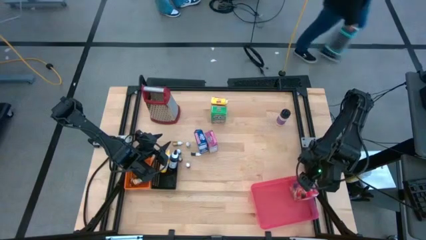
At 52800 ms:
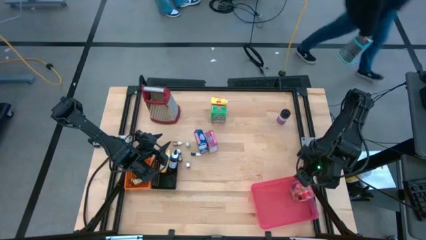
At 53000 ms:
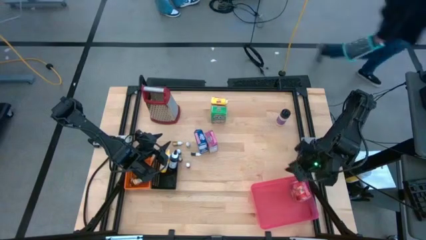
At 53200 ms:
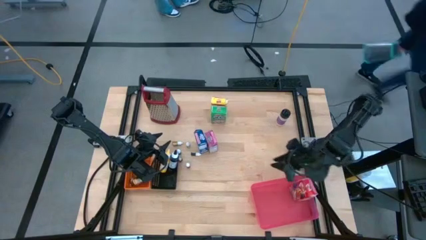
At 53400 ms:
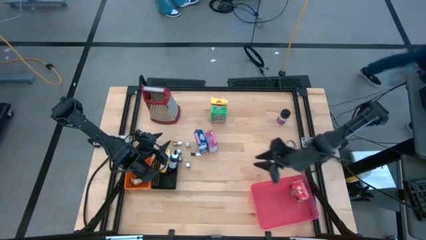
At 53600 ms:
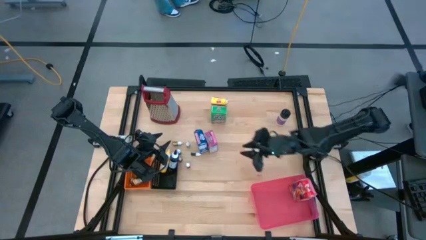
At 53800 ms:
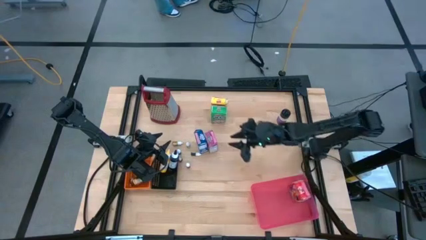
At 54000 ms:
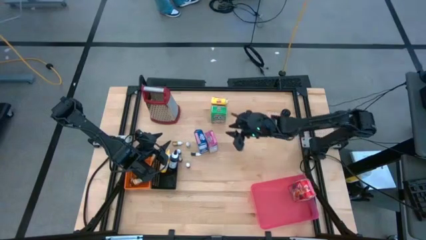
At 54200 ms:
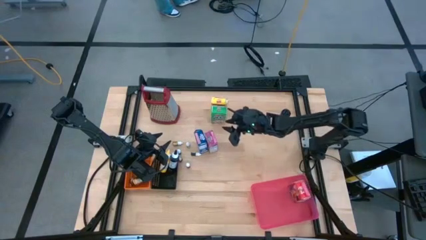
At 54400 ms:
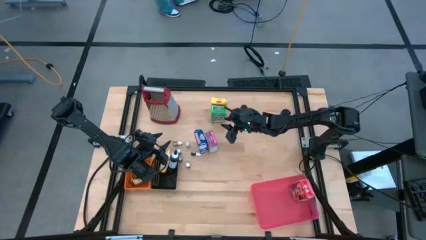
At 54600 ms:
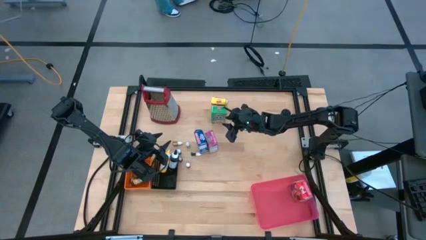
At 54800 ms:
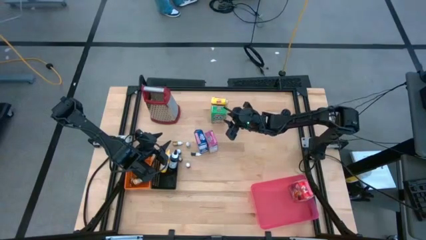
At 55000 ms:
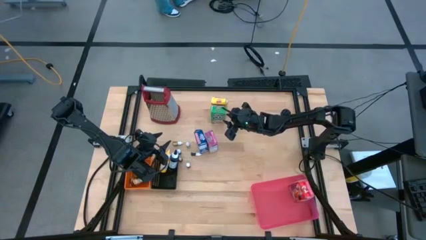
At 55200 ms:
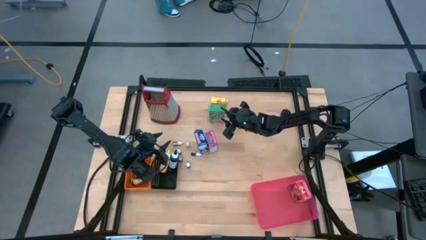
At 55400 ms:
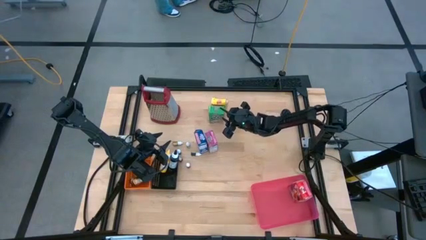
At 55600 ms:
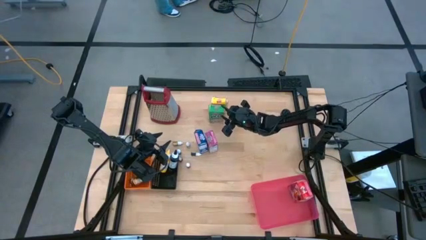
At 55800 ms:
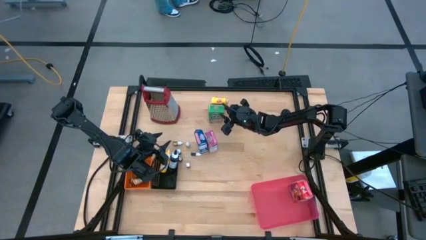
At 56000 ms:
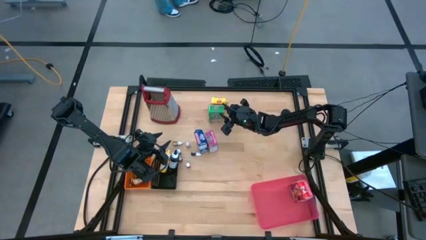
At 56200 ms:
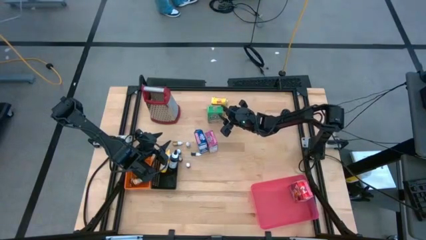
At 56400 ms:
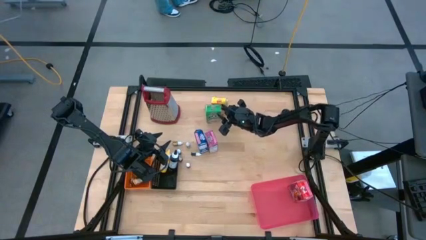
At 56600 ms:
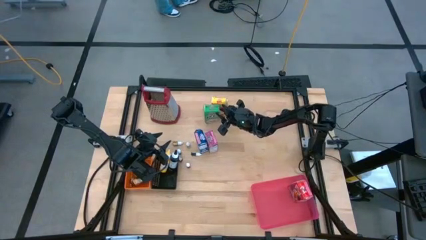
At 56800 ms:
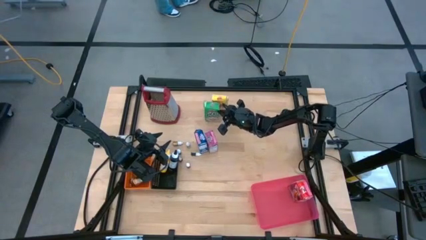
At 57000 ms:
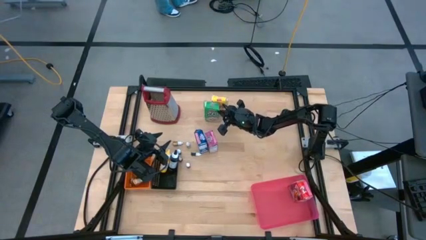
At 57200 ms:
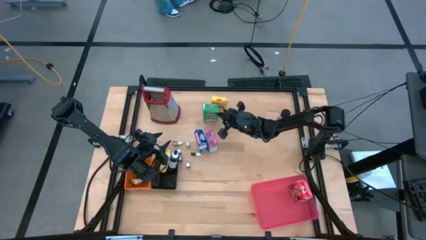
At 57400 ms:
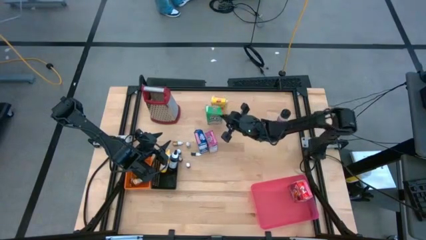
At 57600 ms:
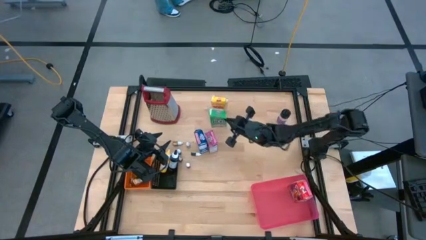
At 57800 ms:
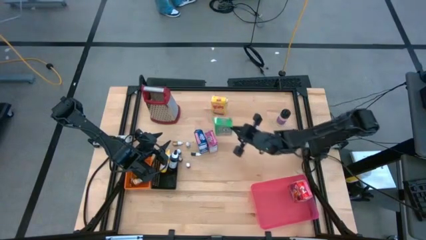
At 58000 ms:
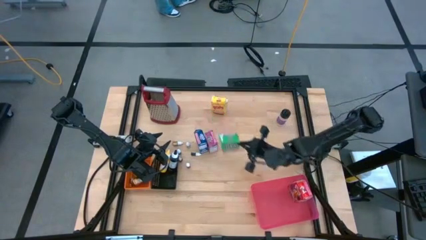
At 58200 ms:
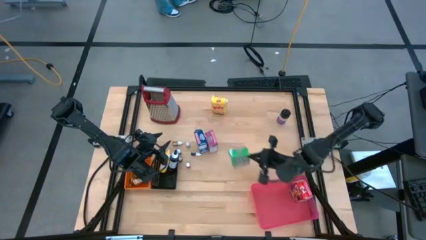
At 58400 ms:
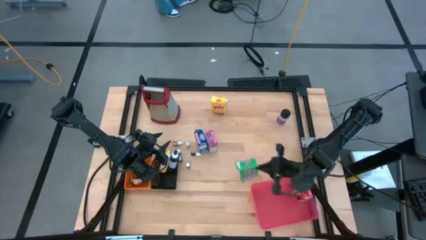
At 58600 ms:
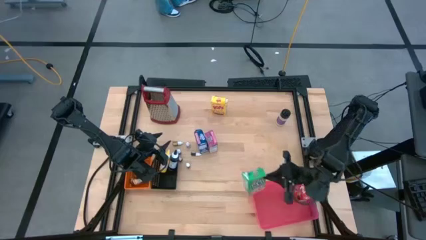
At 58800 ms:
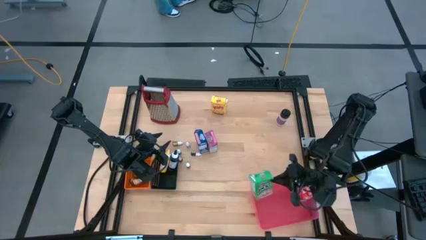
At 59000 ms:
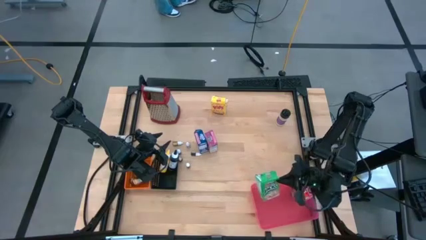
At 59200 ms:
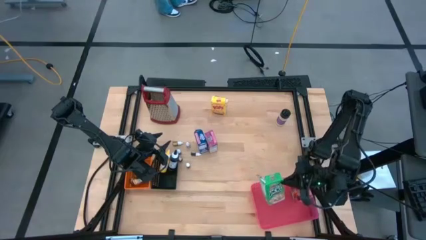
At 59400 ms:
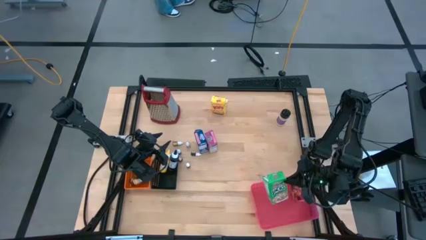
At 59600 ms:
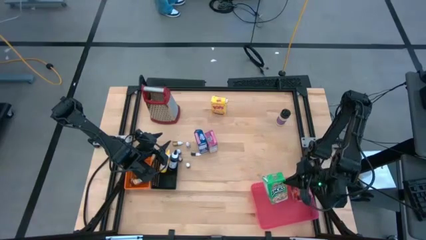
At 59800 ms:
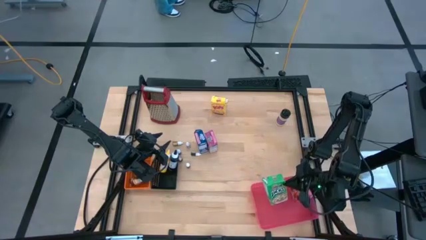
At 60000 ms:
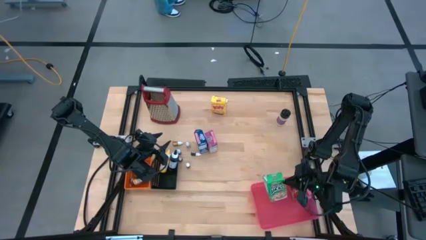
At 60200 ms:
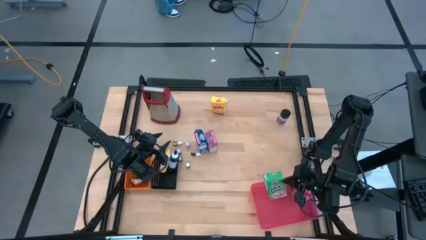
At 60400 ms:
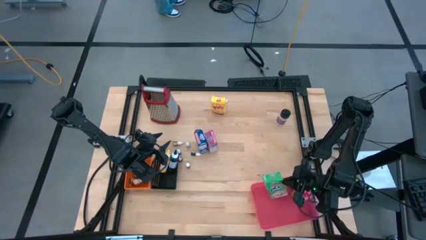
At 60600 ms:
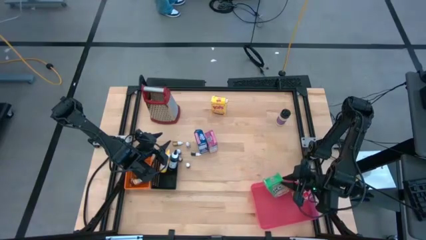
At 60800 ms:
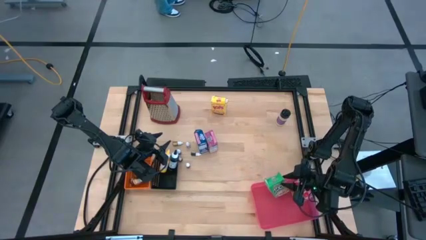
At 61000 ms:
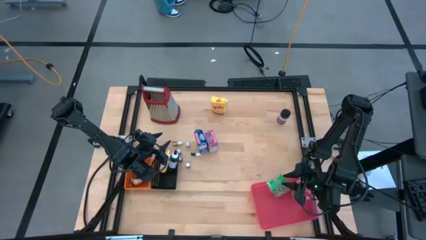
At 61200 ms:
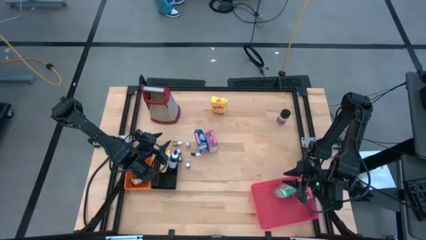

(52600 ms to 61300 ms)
Task: Pick & Place Kitchen Items
Put the green cereal box into the red bin

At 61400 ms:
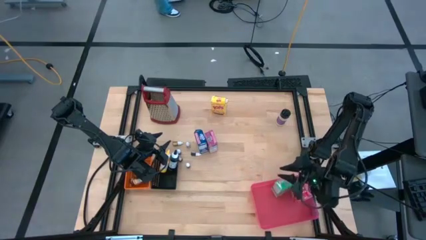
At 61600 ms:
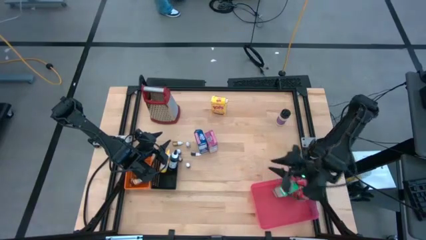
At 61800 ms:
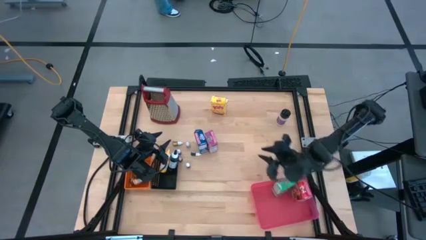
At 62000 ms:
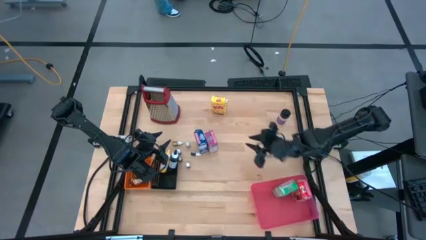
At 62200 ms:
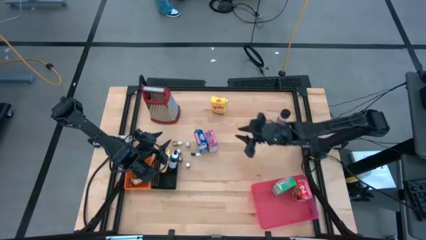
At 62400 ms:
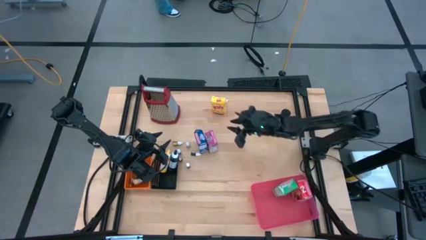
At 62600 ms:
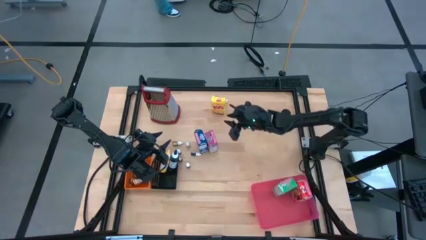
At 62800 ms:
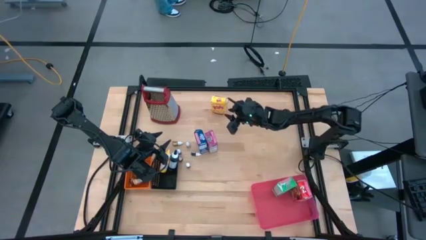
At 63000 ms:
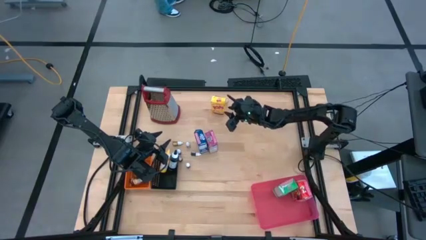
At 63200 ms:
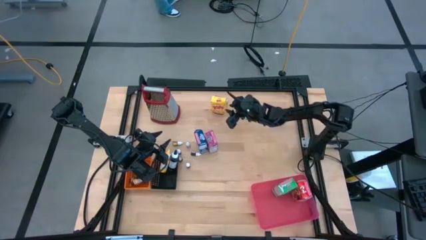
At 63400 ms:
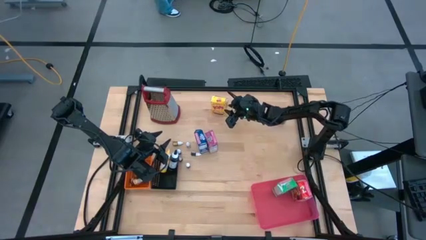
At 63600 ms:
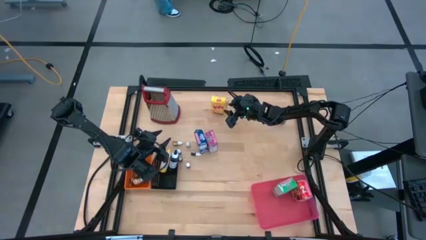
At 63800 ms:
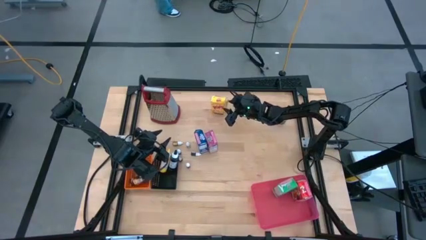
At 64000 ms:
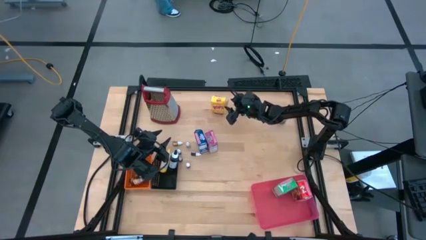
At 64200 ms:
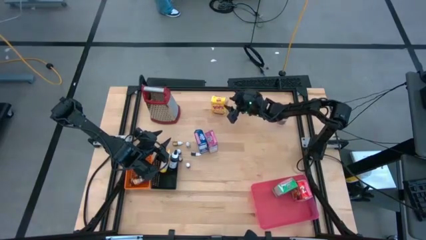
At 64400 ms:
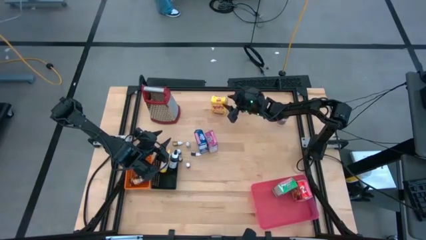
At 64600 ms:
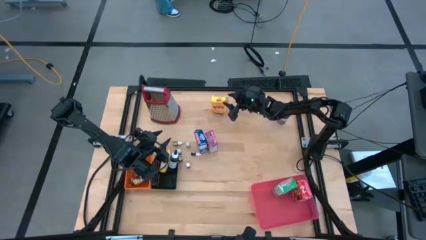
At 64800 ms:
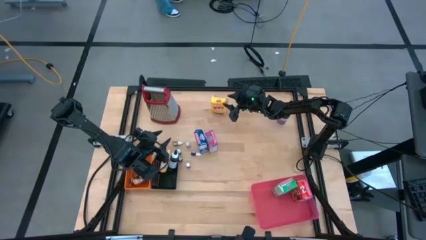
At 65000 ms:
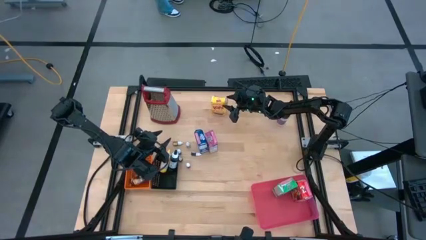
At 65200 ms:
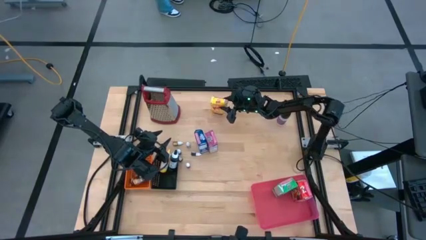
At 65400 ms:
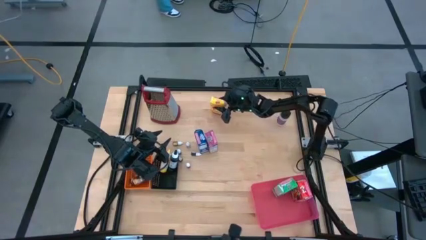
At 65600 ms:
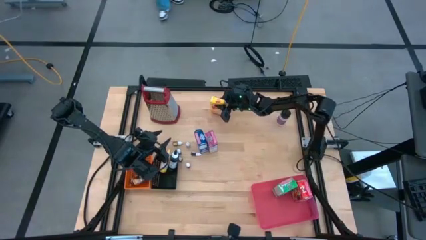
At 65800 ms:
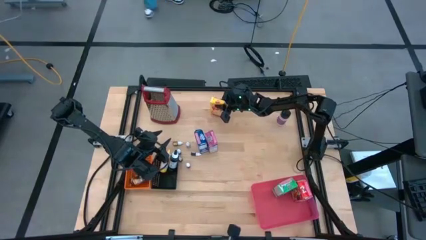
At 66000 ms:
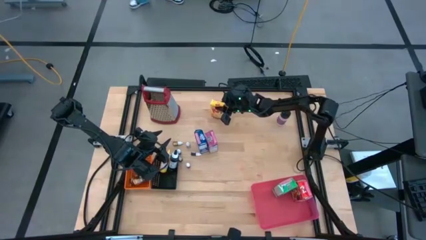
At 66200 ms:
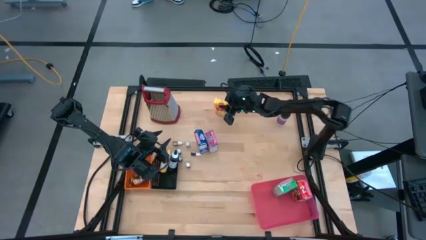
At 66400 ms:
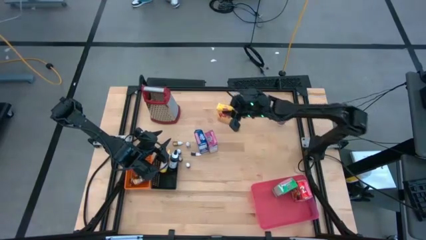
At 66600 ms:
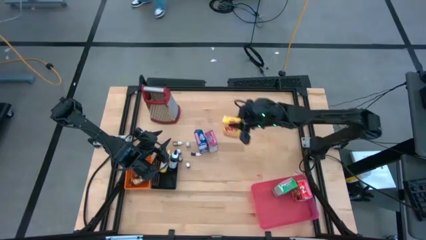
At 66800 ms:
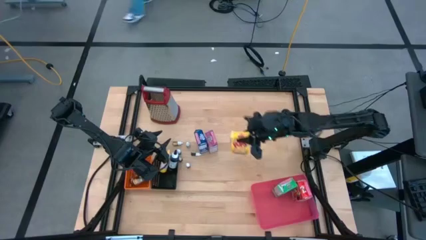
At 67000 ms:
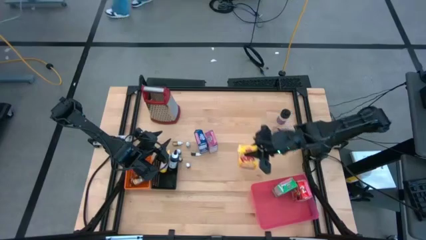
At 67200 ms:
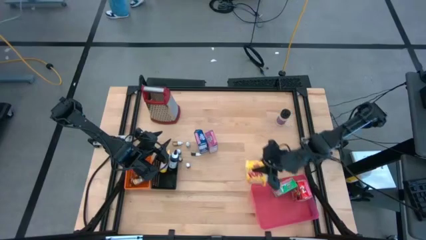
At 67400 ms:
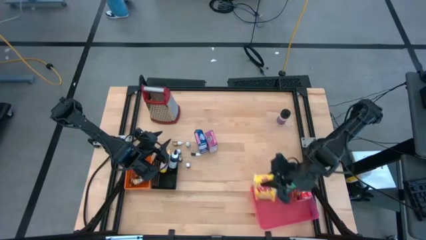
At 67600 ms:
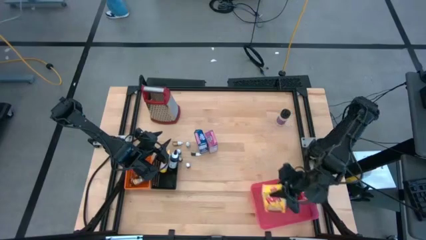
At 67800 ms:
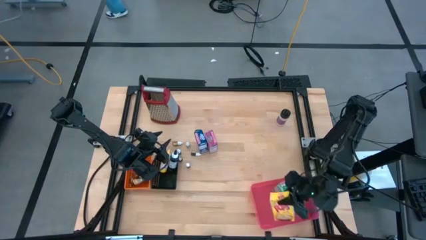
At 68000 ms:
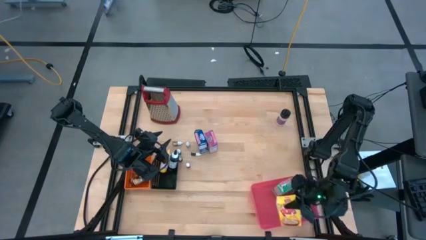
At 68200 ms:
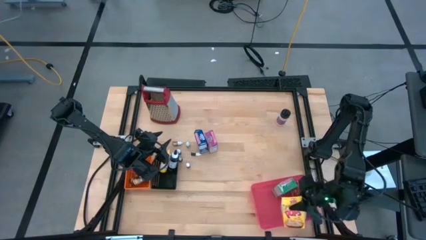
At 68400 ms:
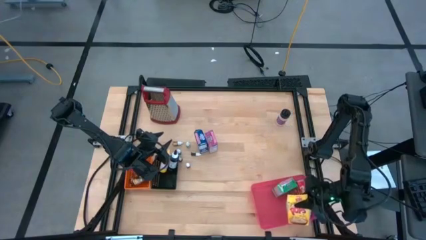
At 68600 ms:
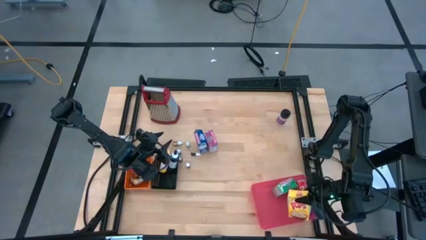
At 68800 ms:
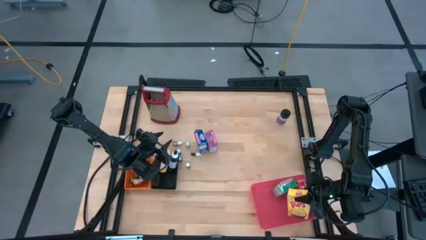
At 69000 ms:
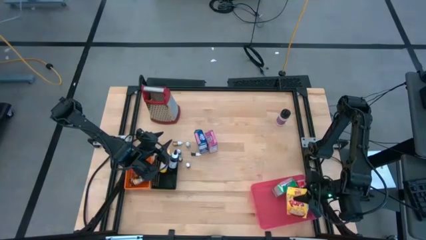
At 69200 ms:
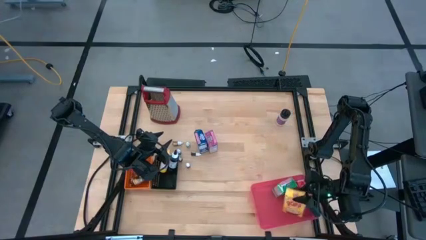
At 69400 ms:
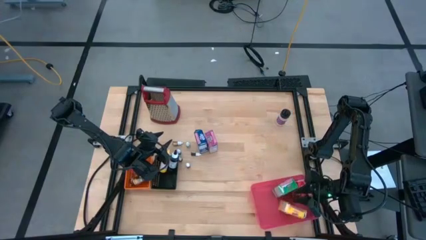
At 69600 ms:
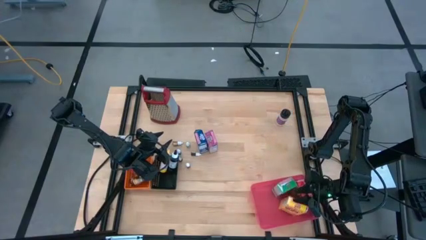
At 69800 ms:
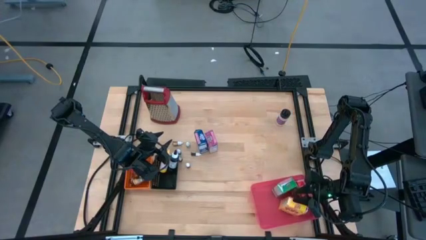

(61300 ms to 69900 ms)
Put the yellow cereal box into the red bin
